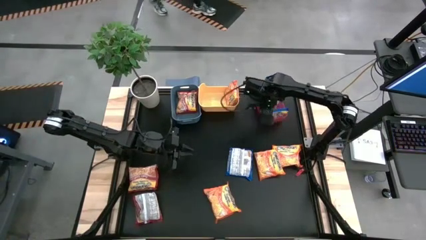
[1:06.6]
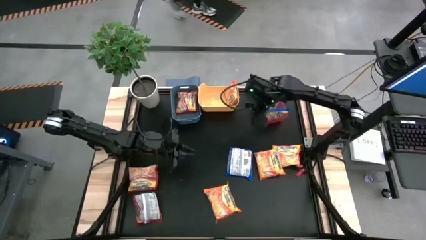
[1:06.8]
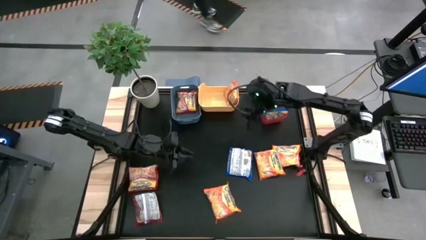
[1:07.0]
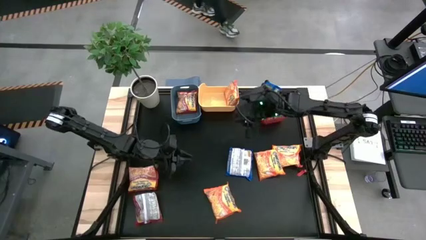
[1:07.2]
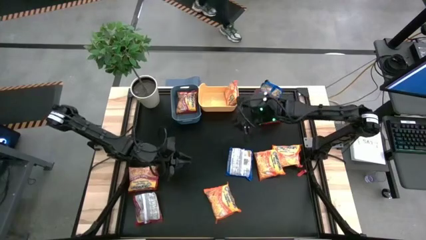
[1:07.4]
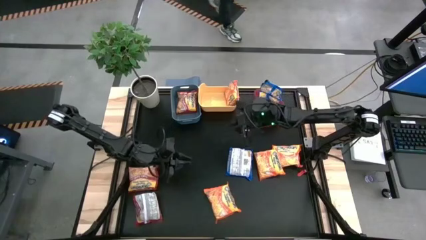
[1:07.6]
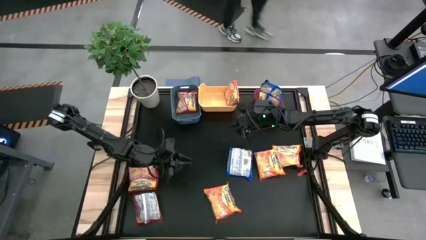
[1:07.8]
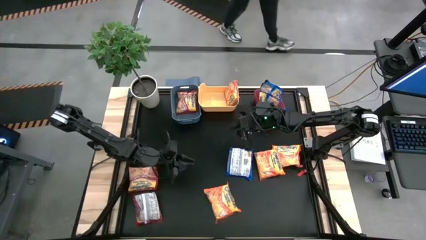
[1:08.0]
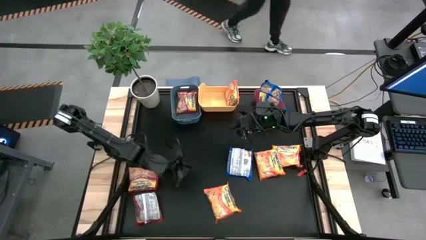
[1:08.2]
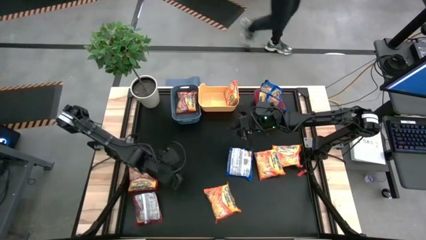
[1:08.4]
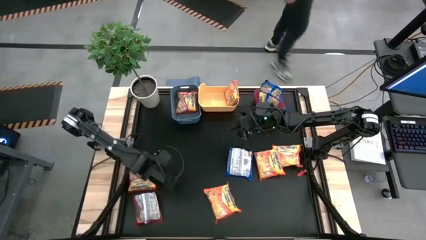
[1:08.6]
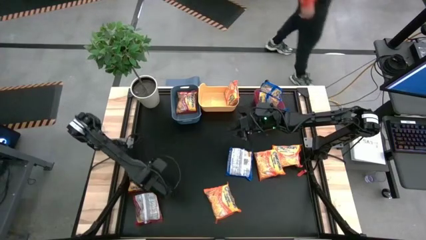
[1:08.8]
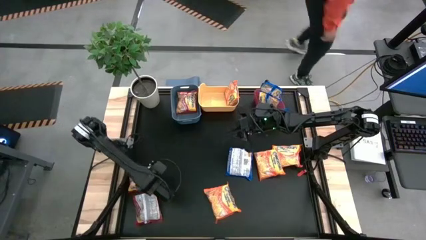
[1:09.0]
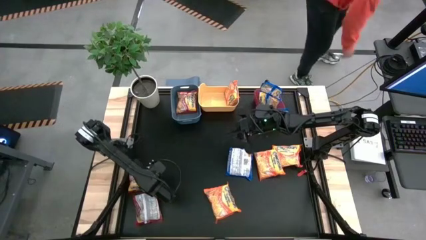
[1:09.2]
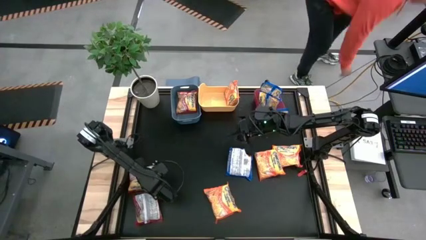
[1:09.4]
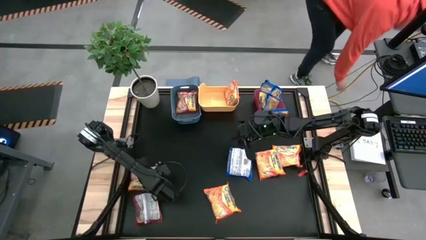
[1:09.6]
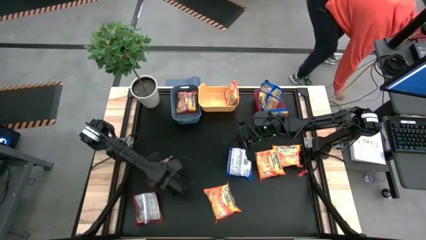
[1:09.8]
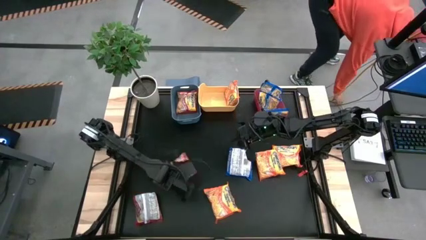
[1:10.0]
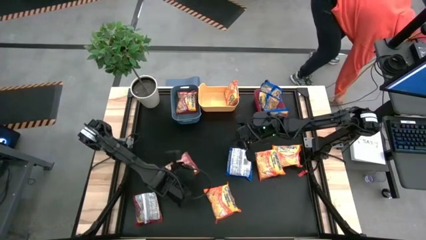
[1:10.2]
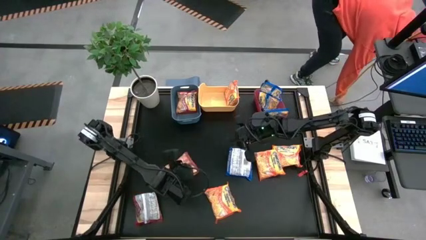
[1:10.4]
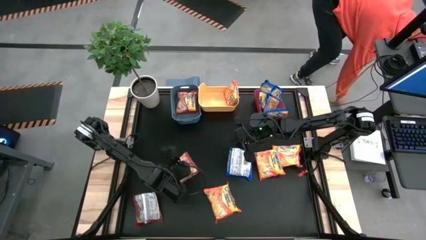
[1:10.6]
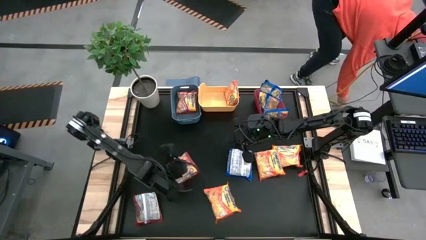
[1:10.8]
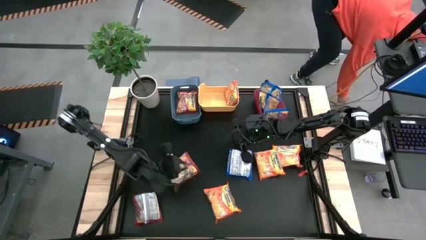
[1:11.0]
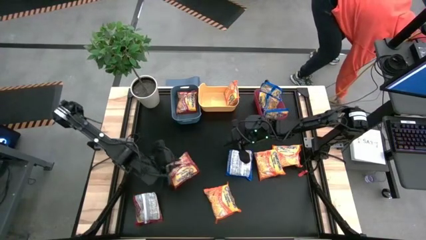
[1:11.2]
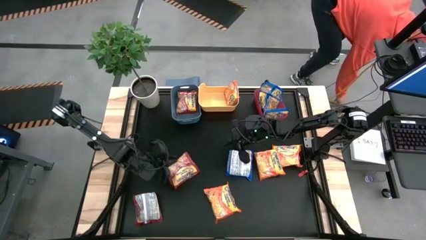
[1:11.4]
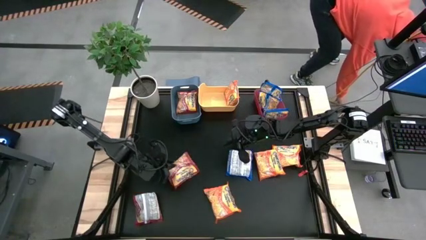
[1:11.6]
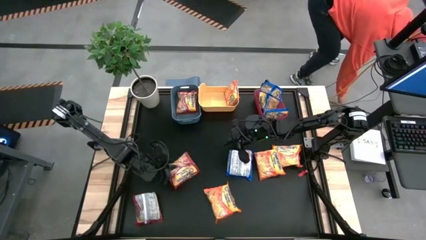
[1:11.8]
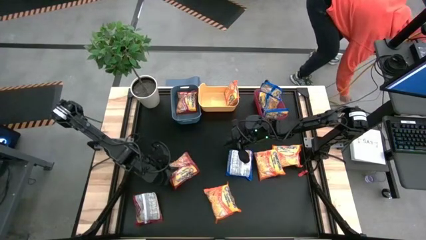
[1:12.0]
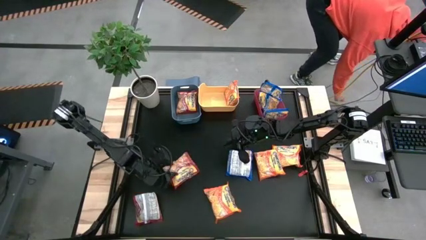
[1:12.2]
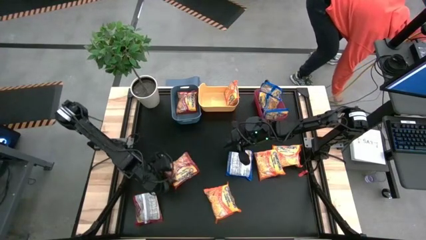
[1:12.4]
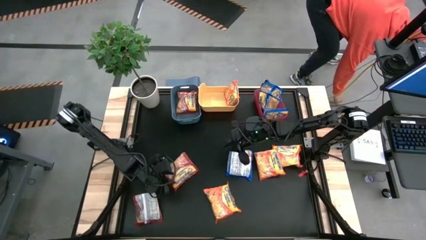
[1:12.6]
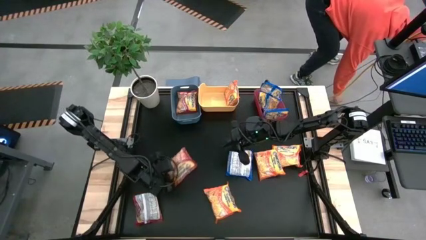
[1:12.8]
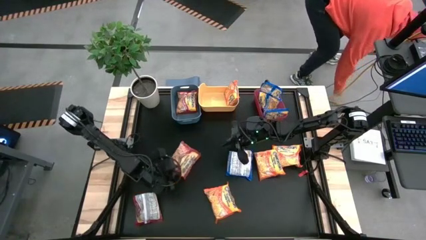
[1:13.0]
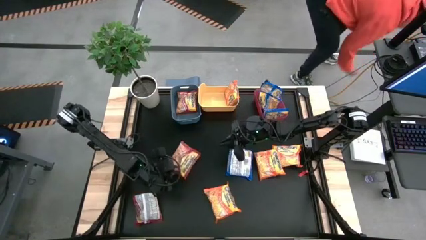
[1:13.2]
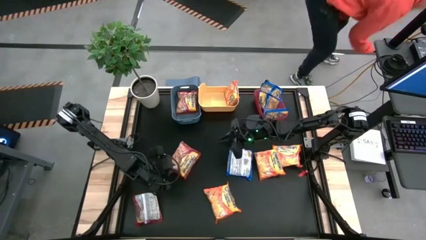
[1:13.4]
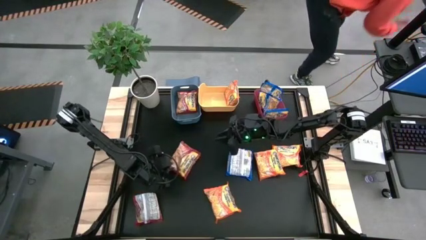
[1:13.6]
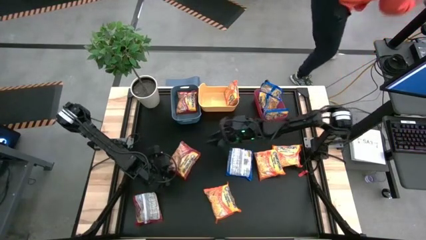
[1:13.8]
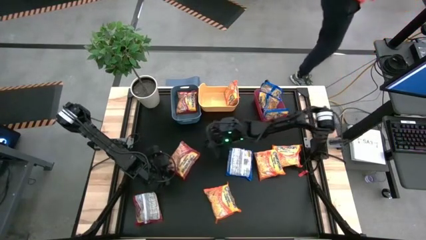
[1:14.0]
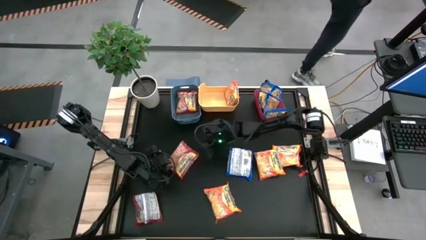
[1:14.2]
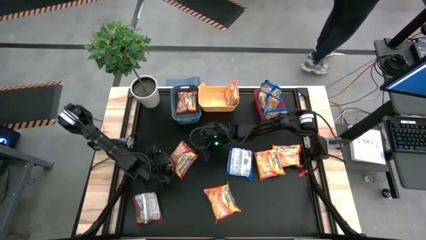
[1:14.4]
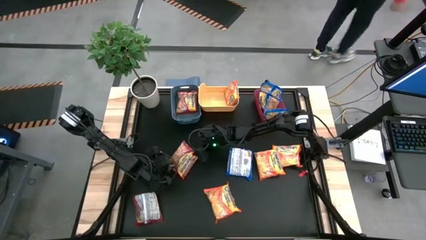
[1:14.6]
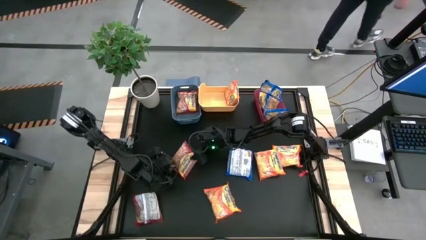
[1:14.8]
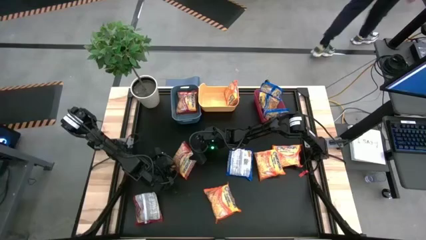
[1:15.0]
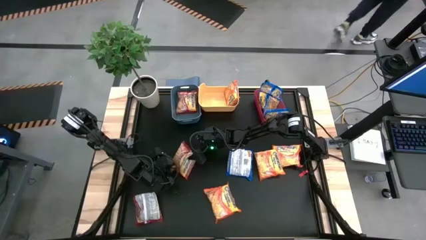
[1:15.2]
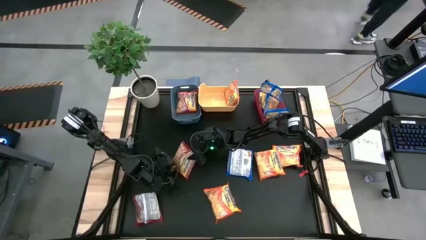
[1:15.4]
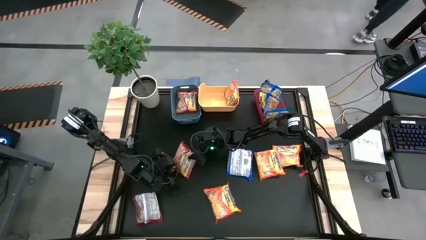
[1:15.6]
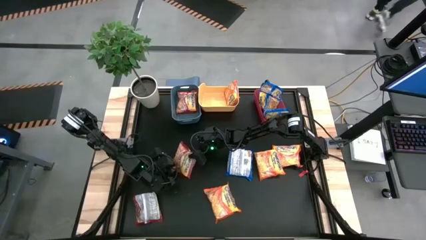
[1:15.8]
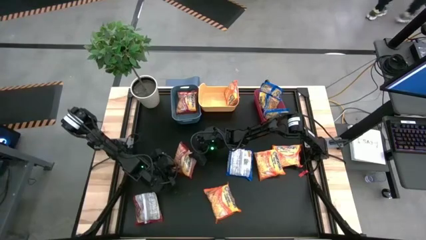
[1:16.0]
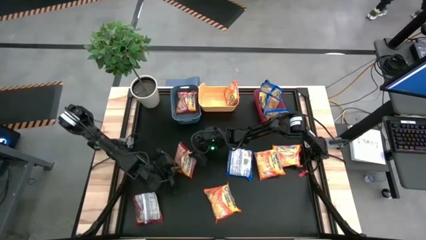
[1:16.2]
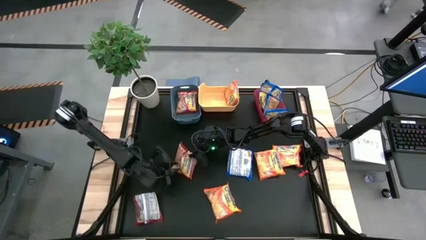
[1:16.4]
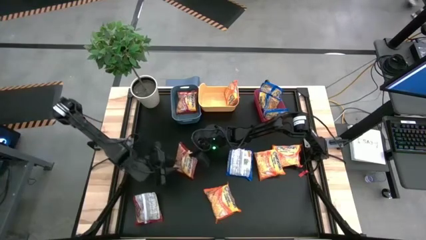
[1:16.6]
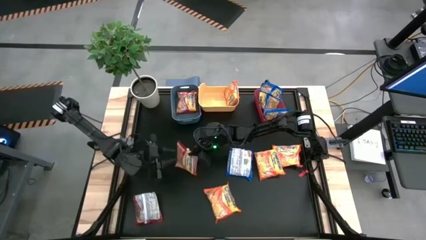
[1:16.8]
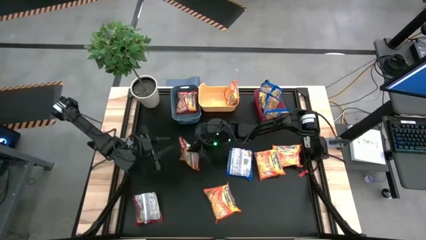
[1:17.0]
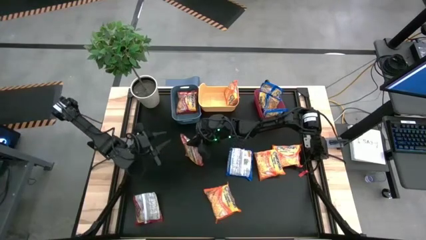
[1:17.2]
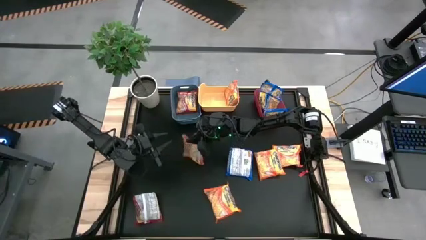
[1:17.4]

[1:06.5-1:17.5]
Task: Sort Maruchan noodles
Put the red noodle pack into the blue bin

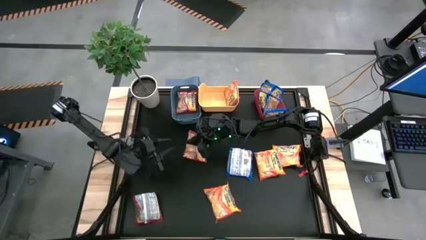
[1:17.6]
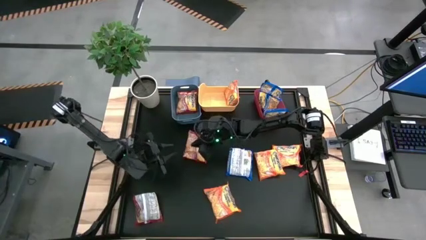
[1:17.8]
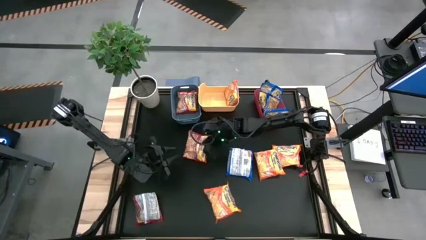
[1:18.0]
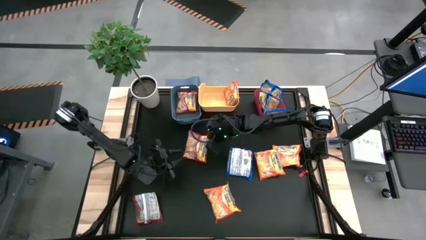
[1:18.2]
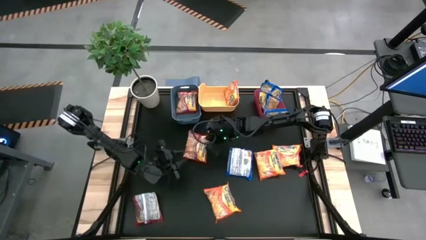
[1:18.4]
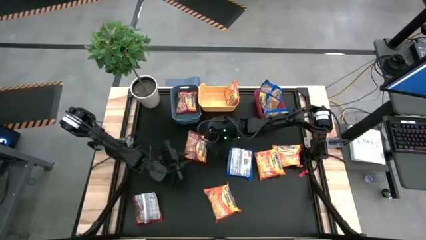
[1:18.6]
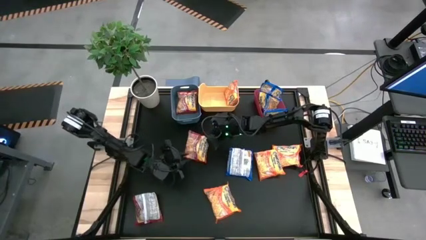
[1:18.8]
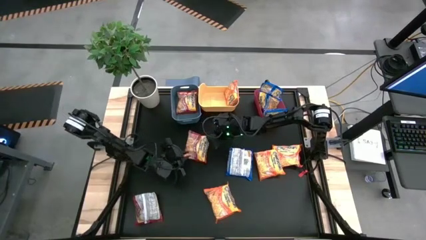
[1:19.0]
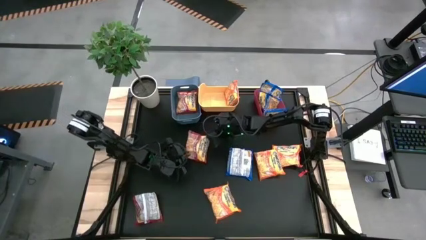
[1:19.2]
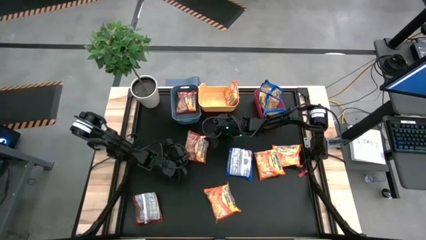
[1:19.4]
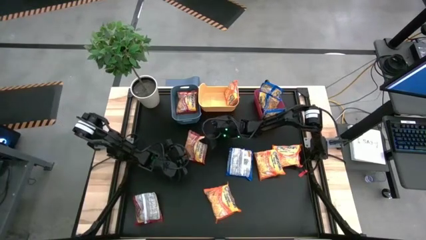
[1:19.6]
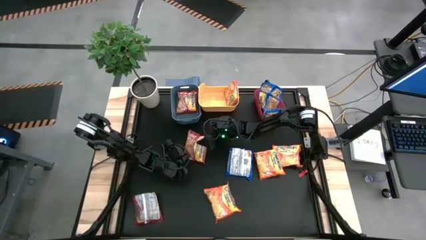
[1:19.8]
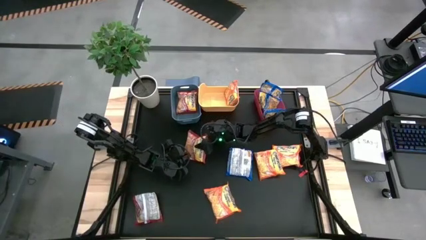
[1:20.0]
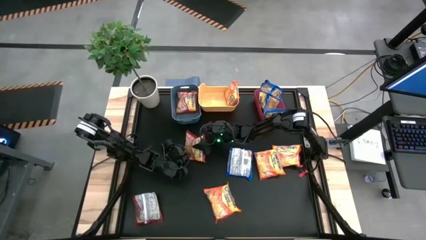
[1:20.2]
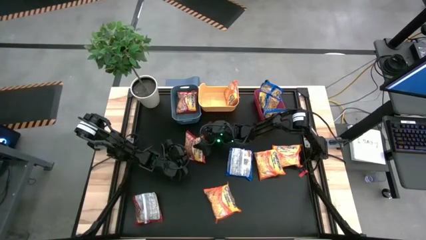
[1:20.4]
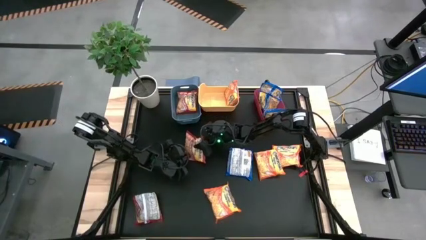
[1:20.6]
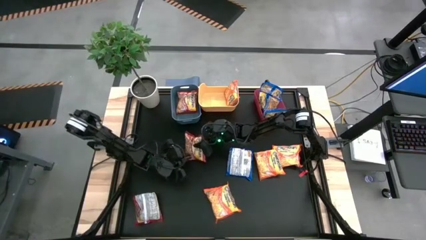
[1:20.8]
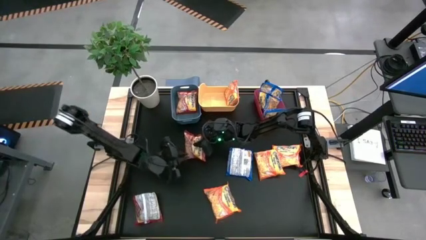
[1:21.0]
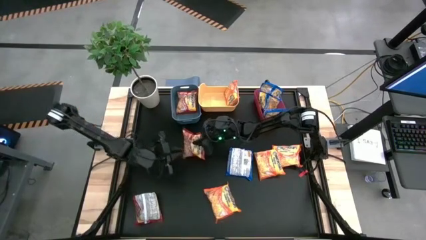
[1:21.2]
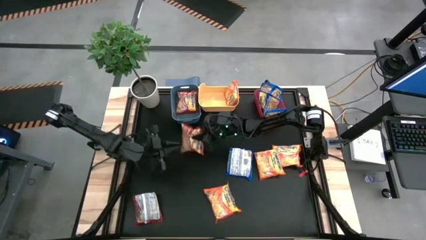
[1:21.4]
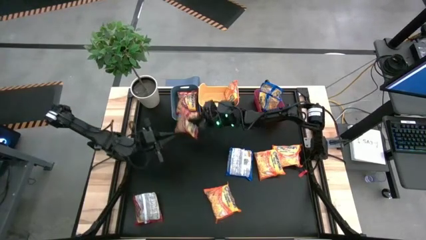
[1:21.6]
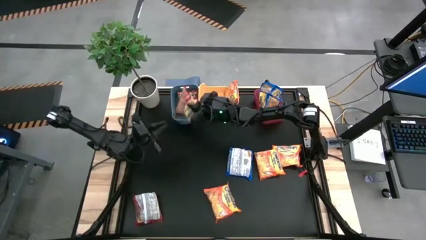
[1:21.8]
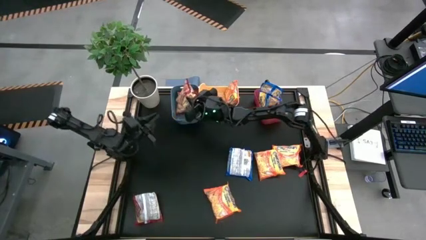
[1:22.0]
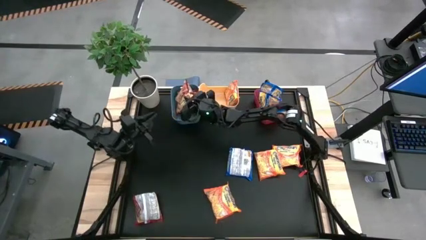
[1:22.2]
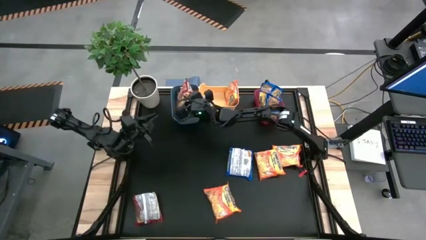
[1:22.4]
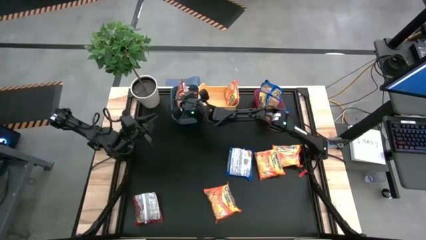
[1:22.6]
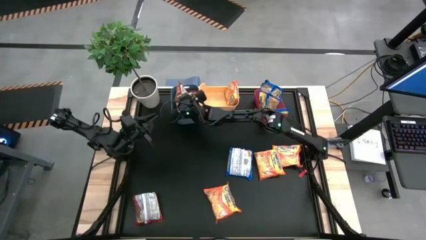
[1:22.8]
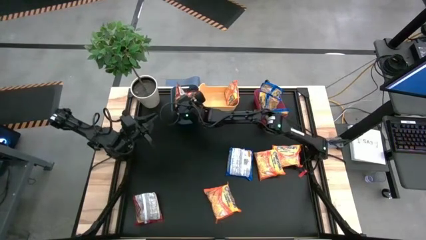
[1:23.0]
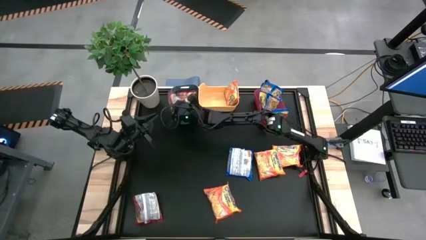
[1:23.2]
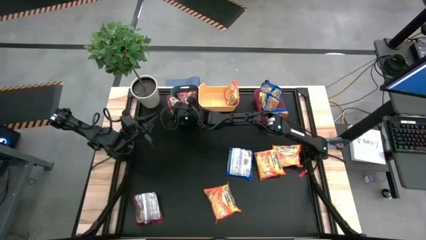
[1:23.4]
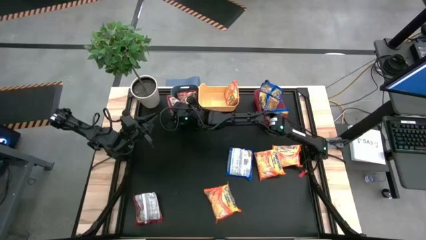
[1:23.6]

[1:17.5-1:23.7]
Put the red noodle pack into the blue bin
